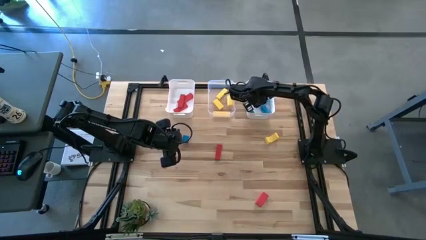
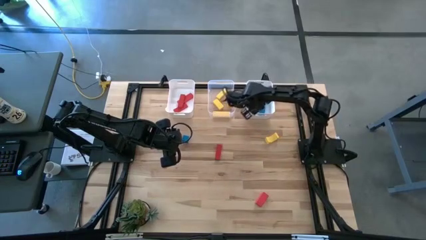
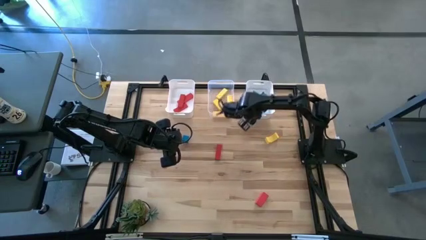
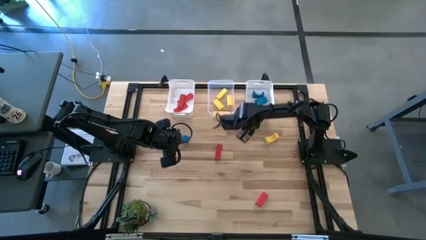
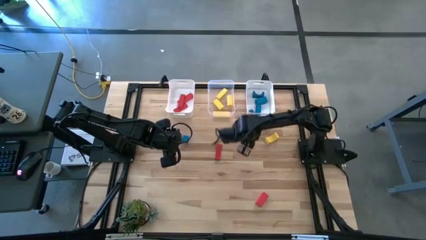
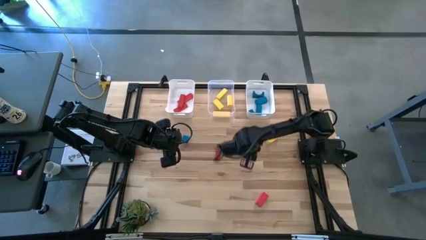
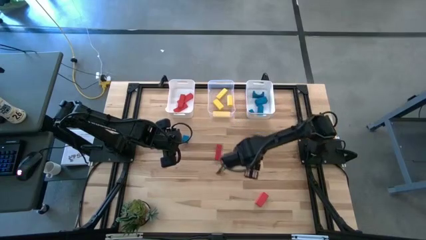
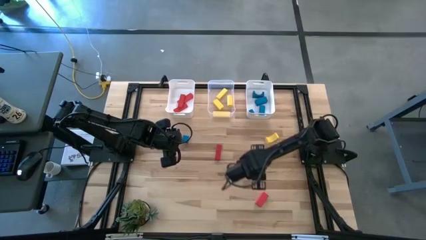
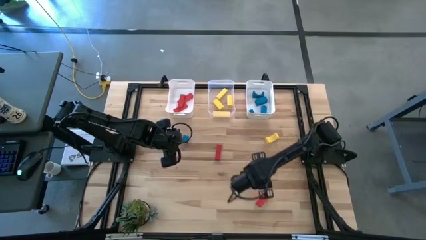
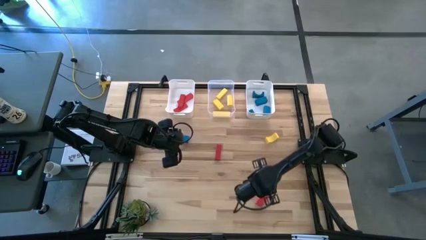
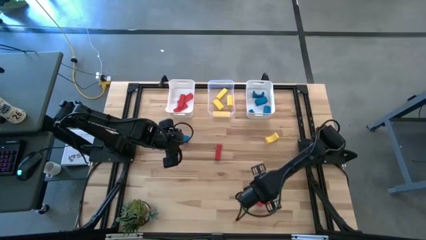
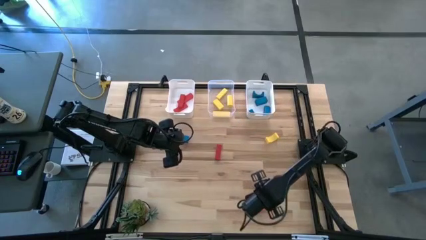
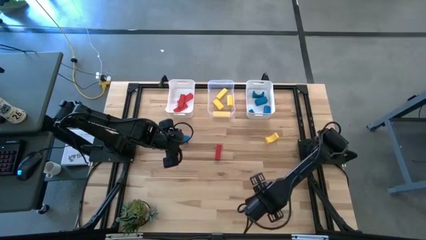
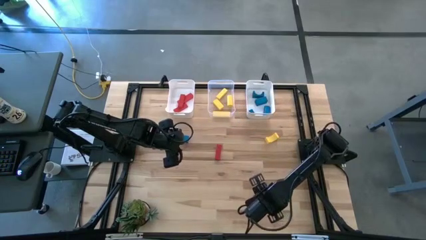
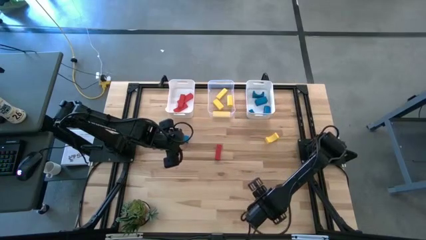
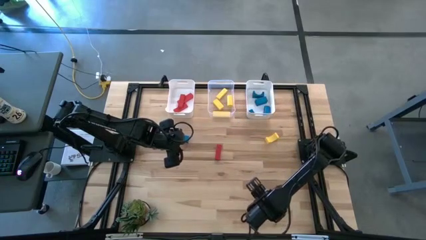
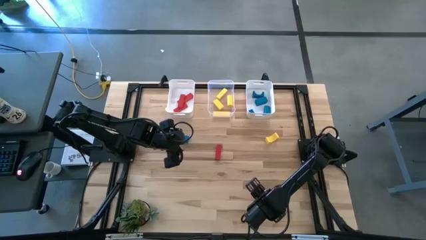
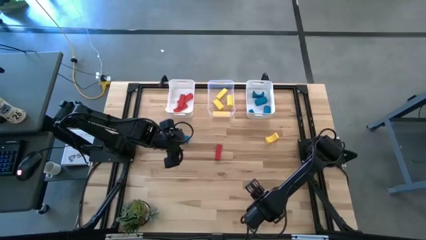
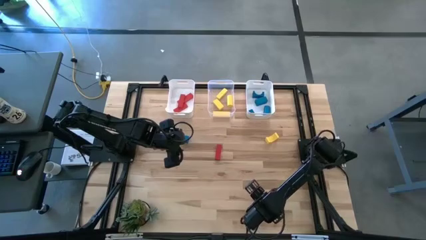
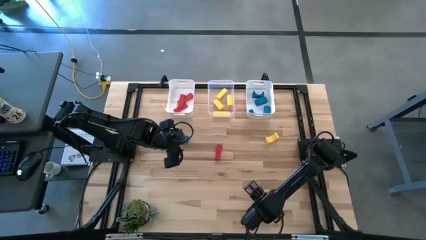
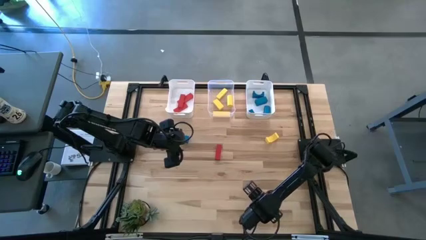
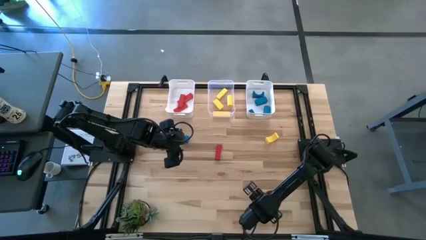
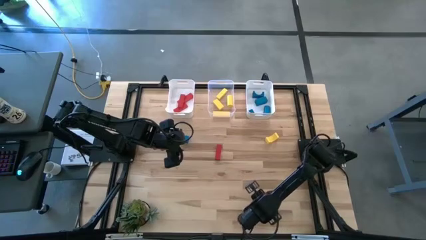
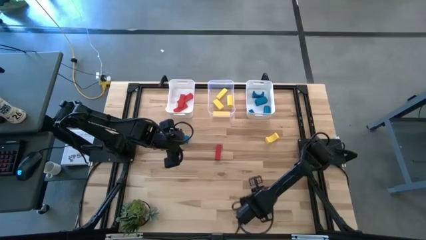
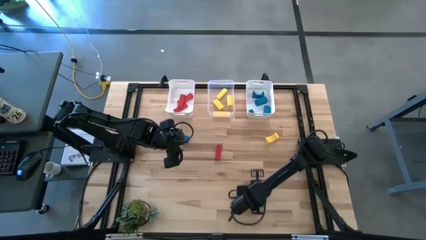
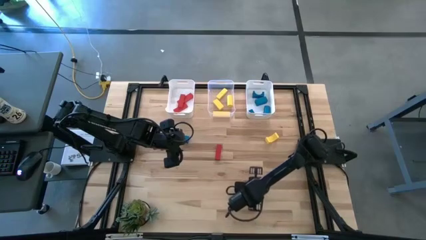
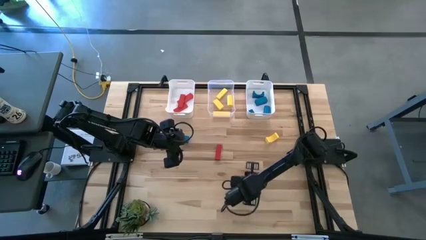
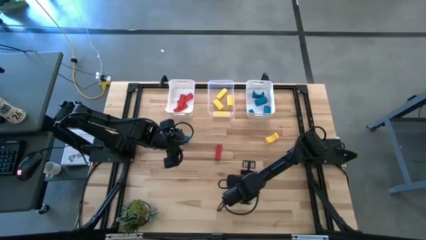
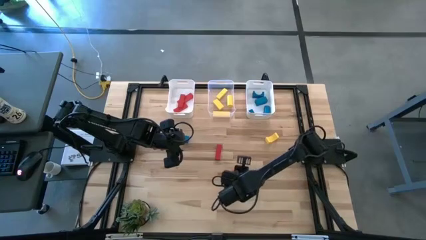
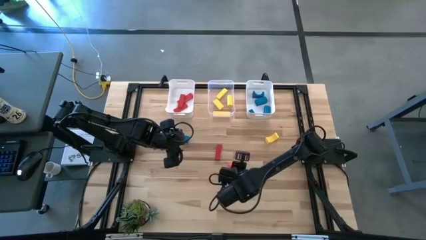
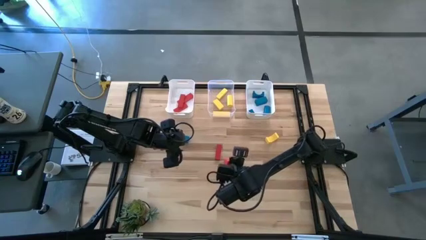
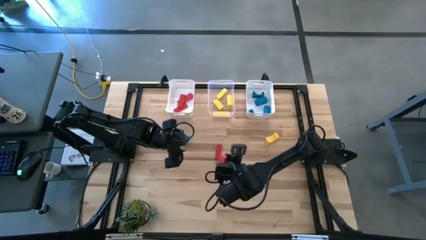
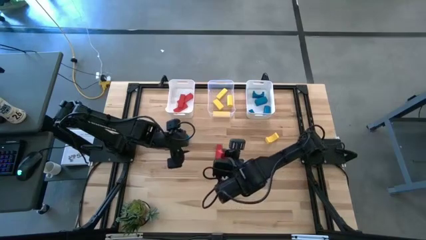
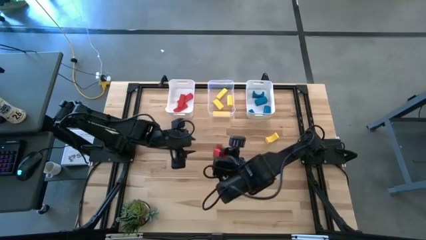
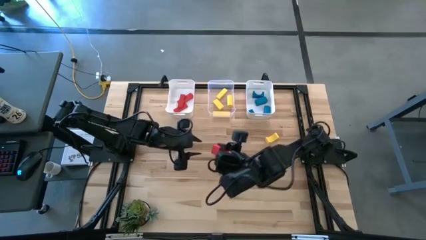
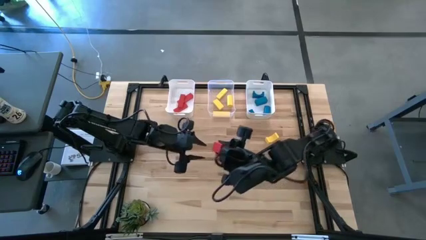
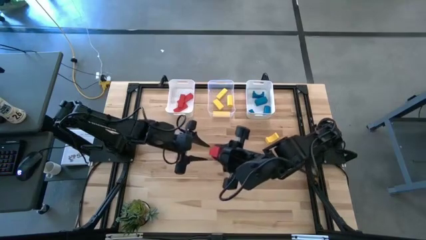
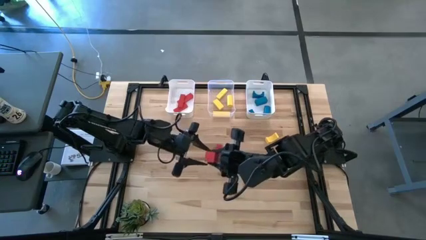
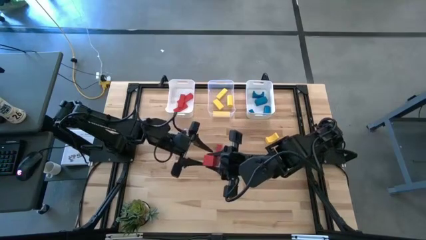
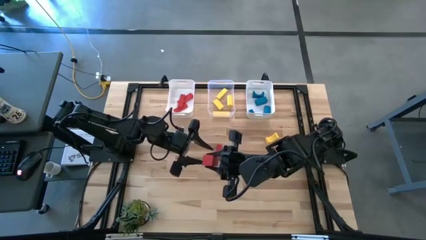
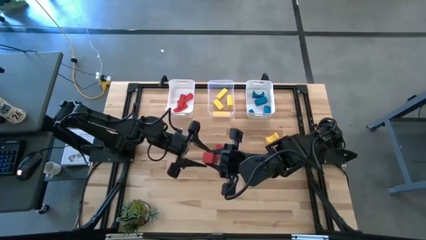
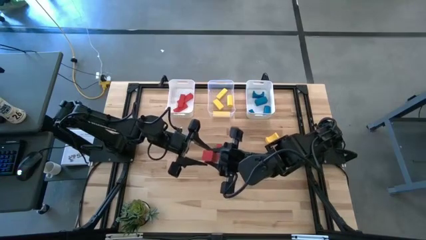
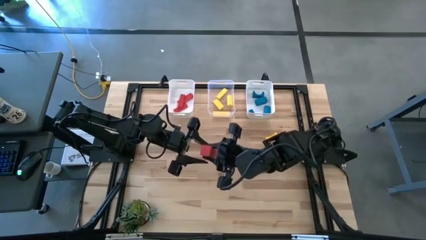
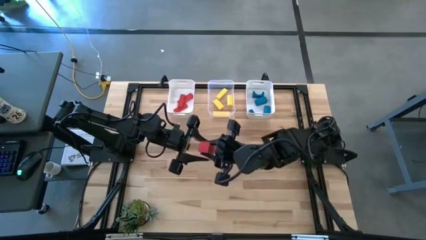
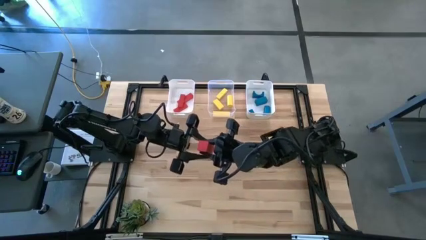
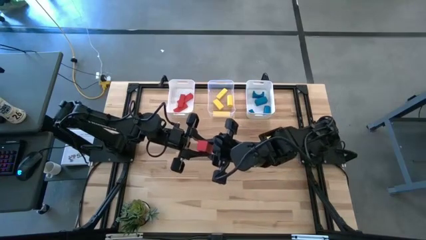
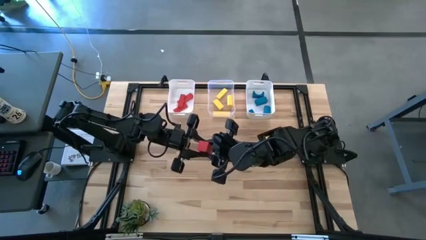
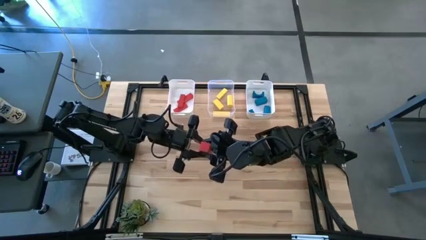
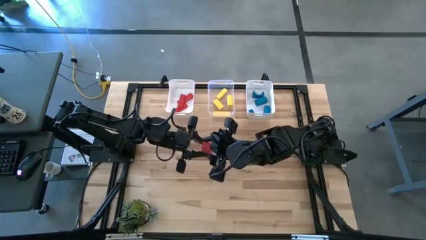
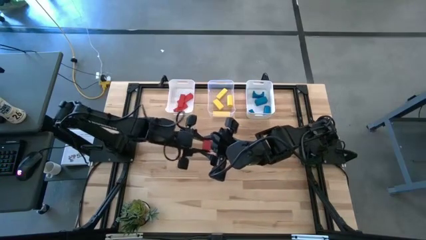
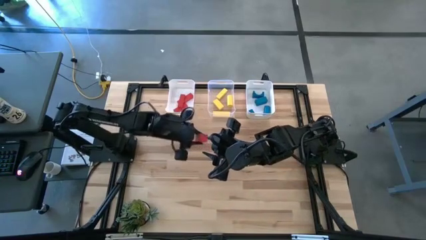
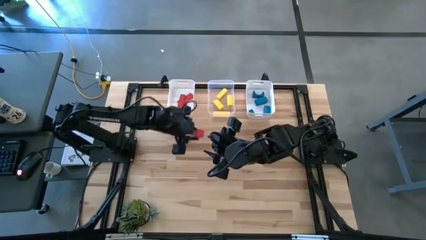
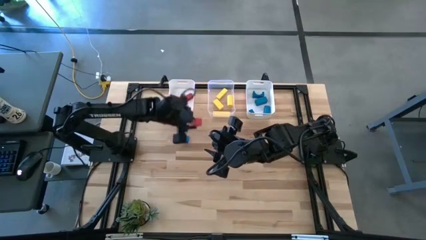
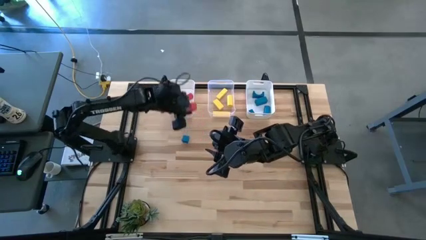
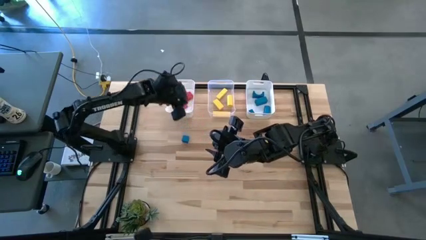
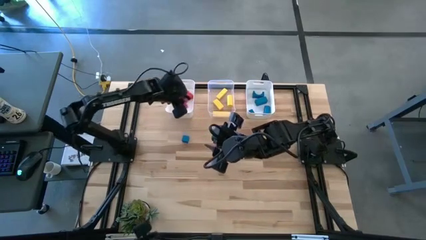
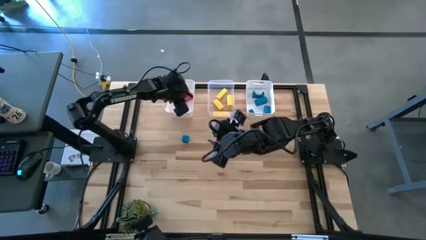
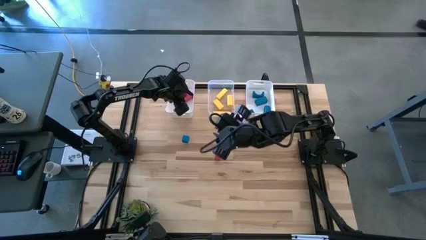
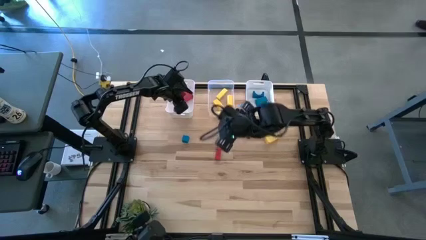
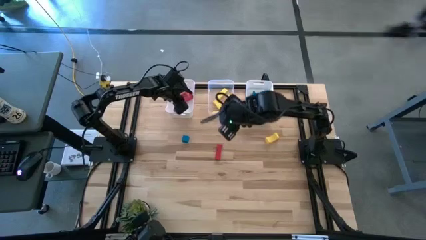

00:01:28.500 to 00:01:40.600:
Task: Sort & place blocks by color
Put the red block into the left white bin

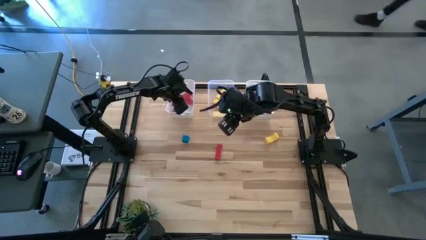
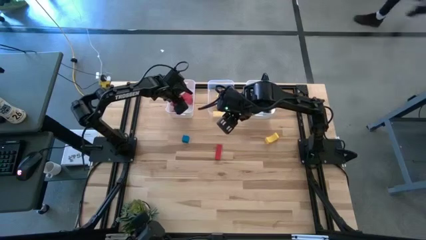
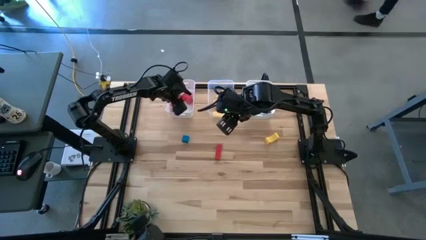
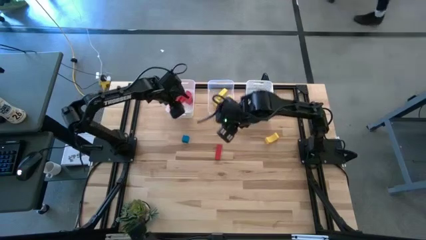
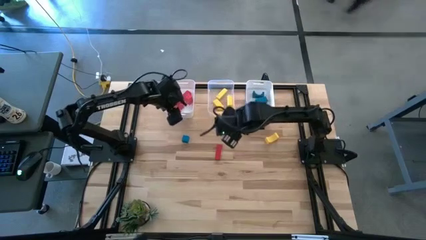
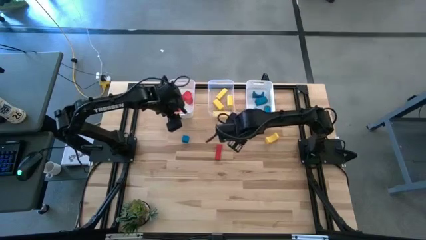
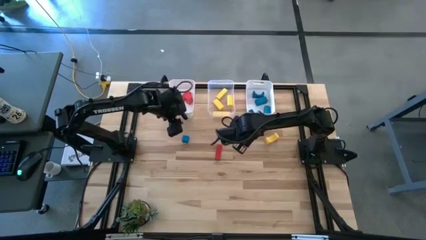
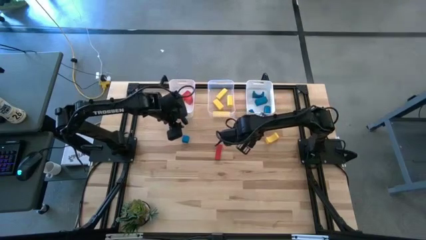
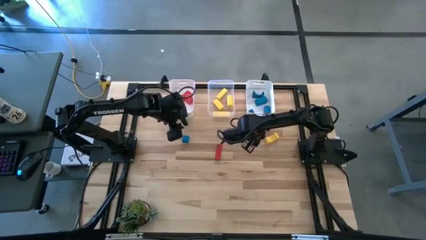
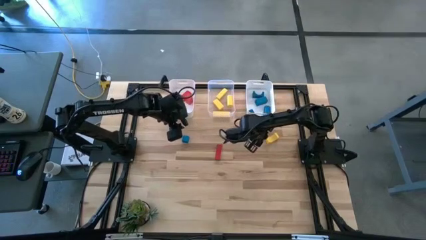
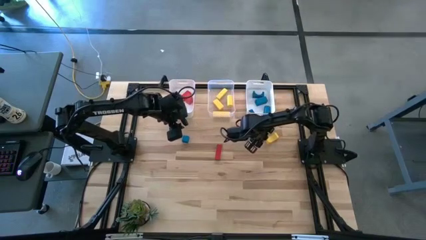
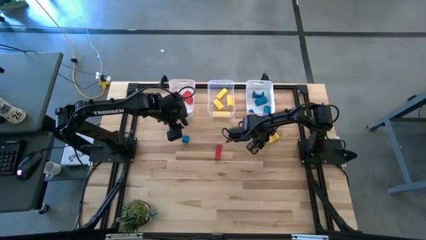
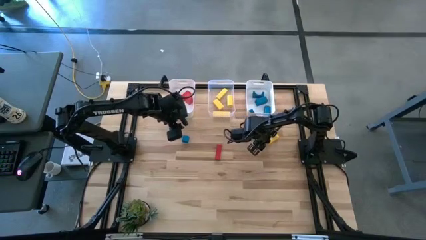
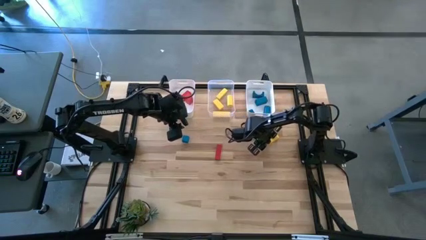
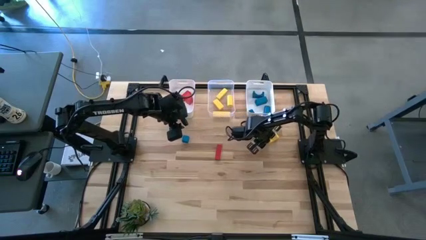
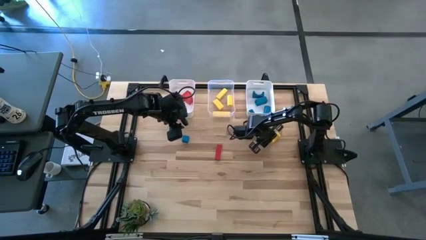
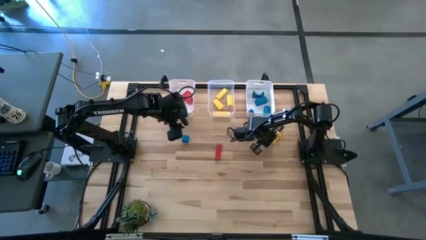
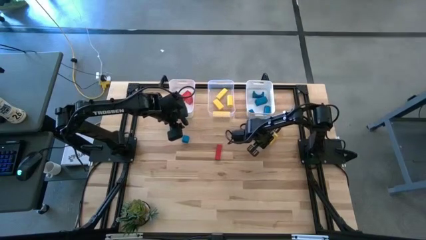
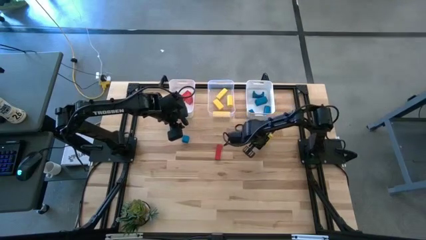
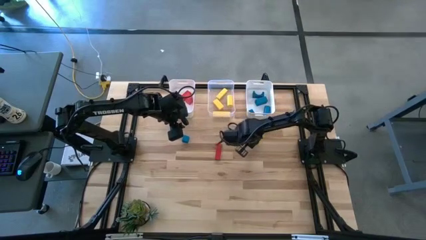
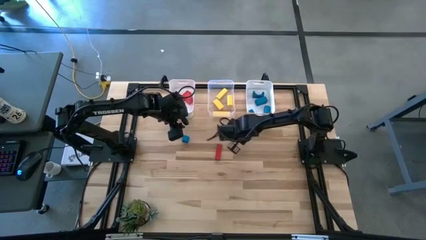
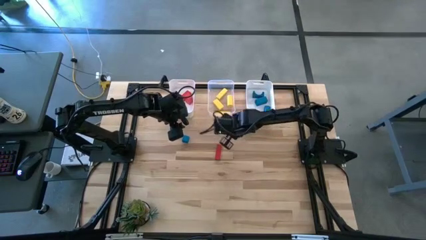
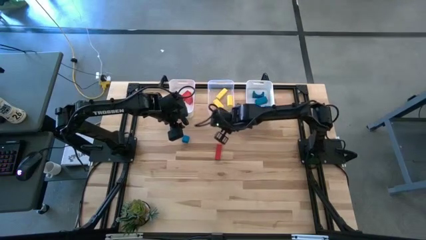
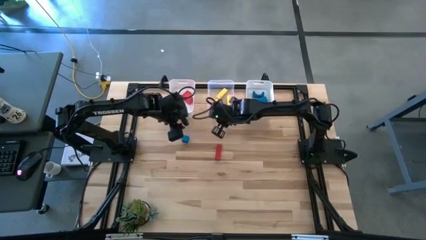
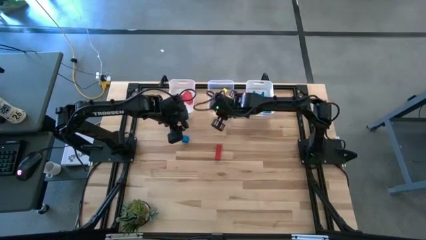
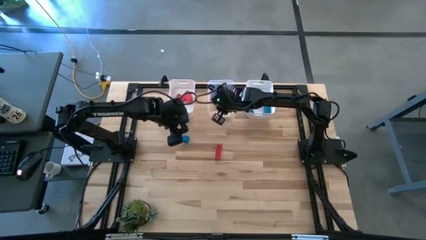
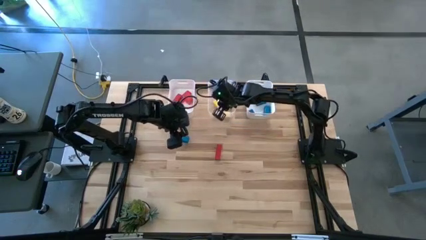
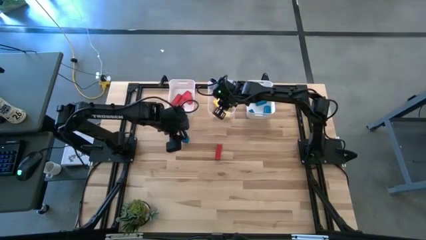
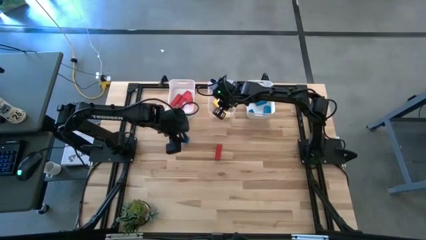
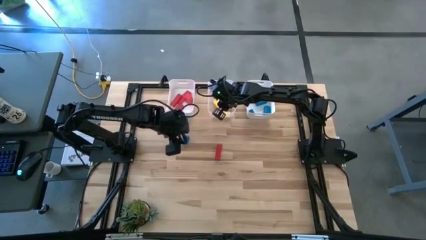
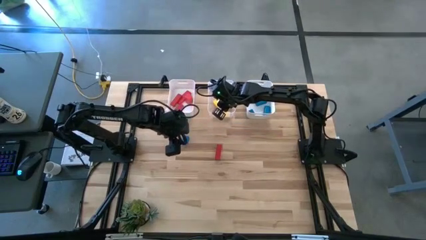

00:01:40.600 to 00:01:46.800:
Put the yellow block into the transparent bin
